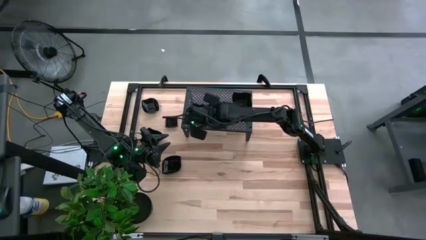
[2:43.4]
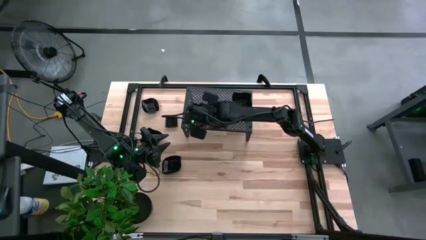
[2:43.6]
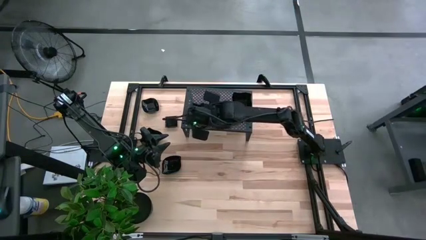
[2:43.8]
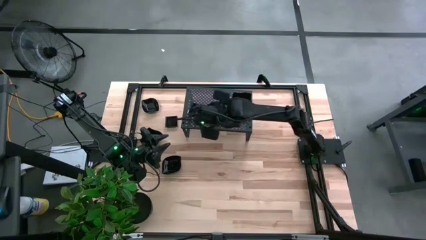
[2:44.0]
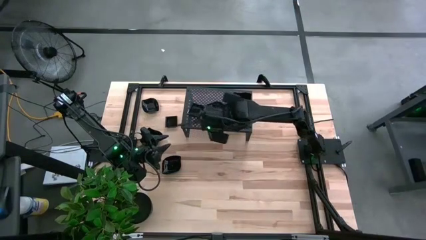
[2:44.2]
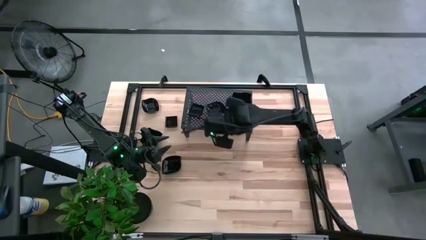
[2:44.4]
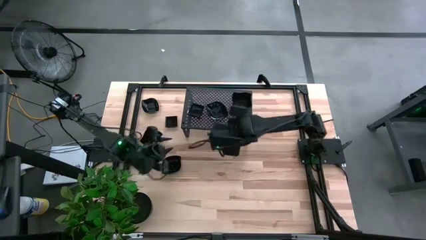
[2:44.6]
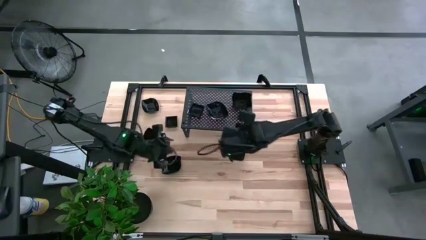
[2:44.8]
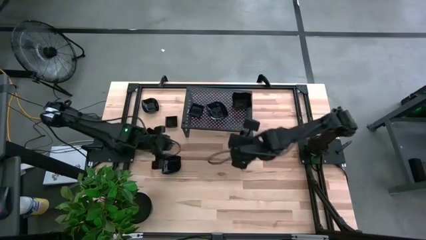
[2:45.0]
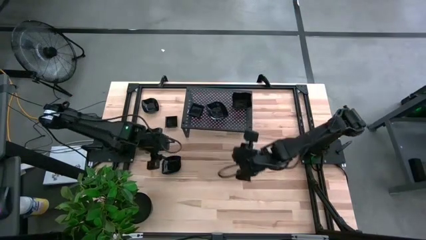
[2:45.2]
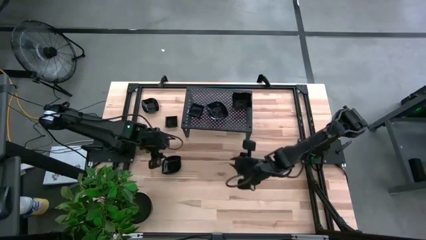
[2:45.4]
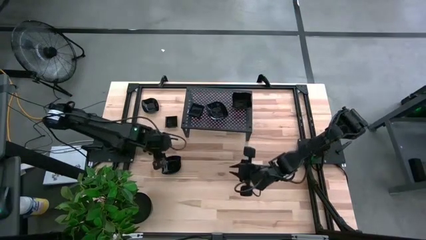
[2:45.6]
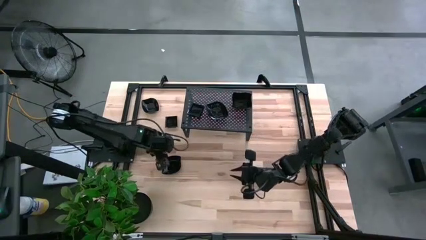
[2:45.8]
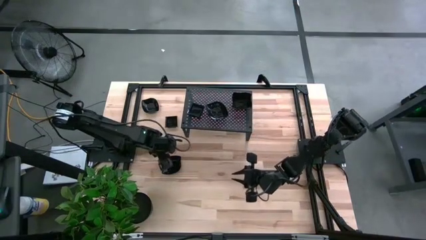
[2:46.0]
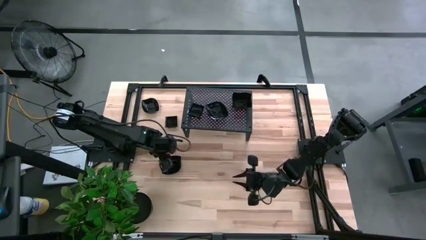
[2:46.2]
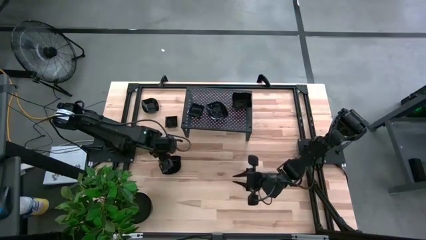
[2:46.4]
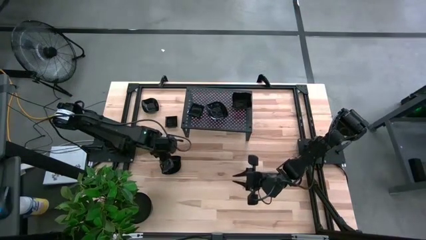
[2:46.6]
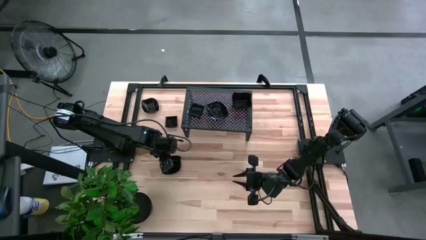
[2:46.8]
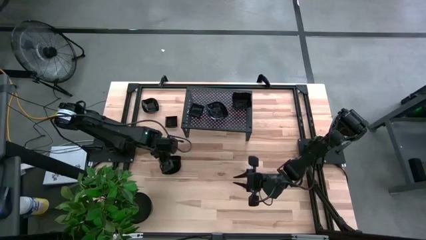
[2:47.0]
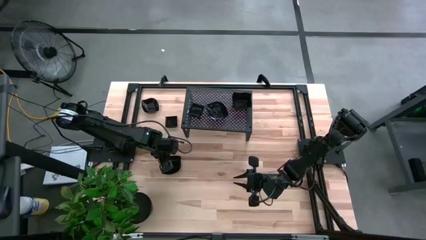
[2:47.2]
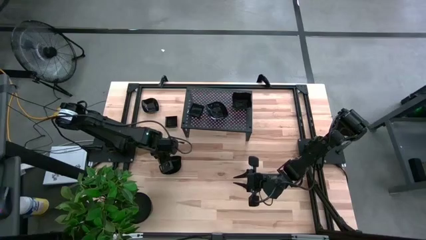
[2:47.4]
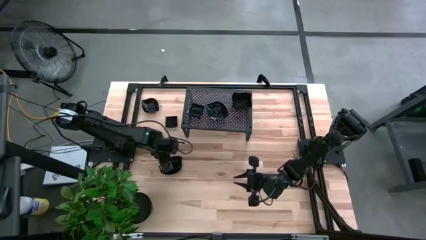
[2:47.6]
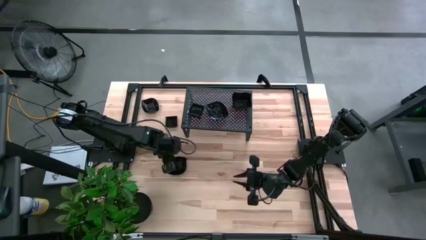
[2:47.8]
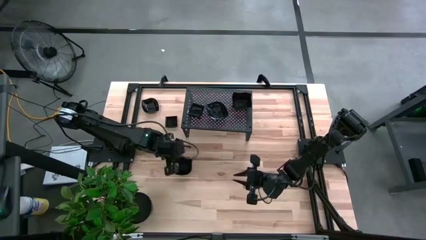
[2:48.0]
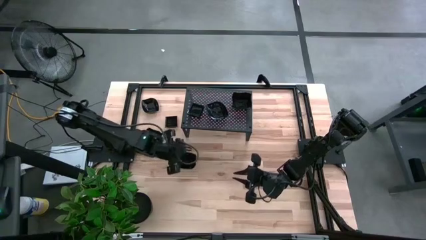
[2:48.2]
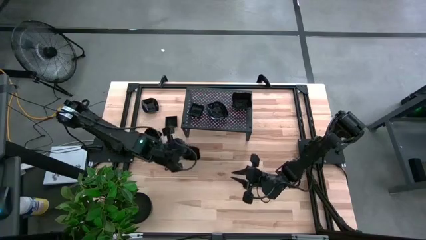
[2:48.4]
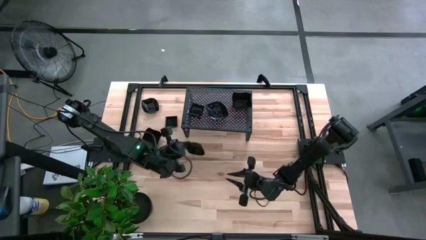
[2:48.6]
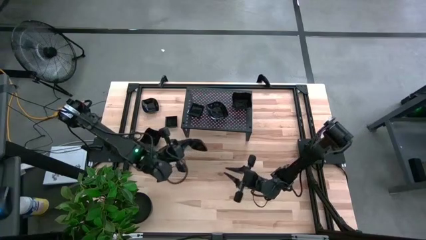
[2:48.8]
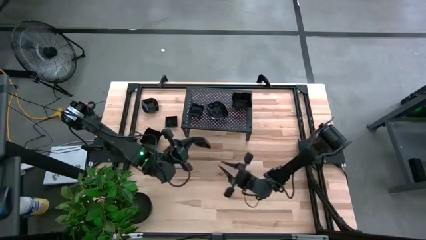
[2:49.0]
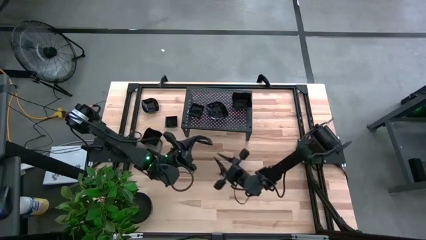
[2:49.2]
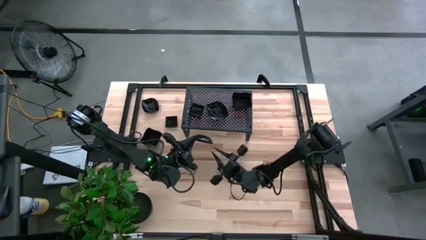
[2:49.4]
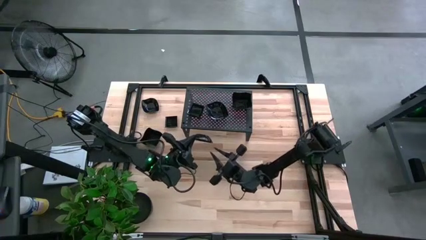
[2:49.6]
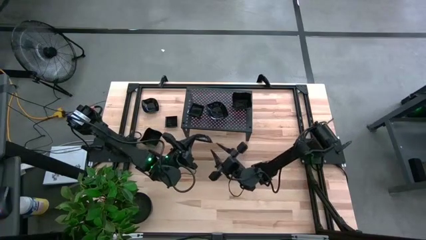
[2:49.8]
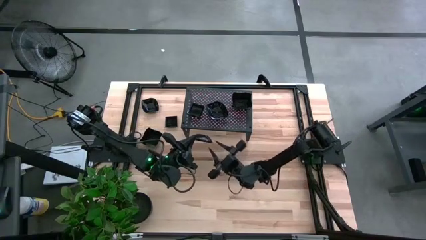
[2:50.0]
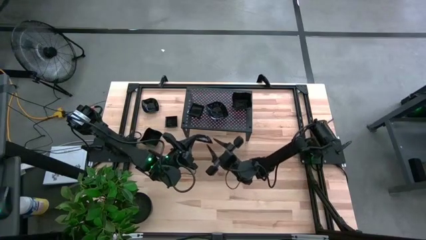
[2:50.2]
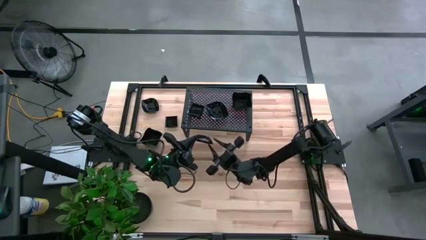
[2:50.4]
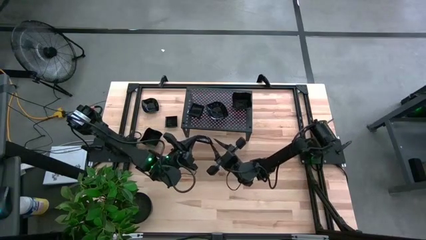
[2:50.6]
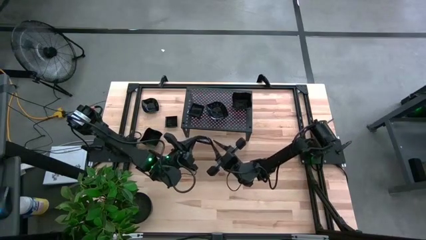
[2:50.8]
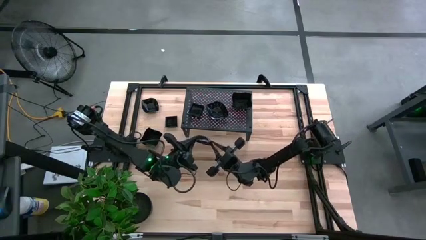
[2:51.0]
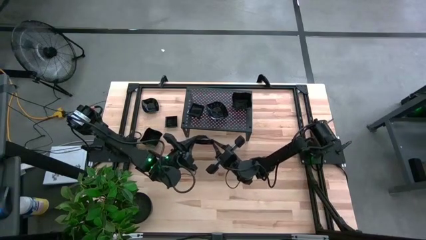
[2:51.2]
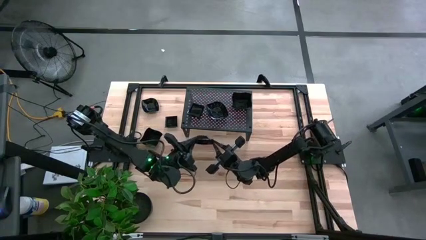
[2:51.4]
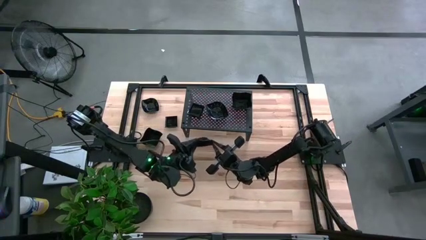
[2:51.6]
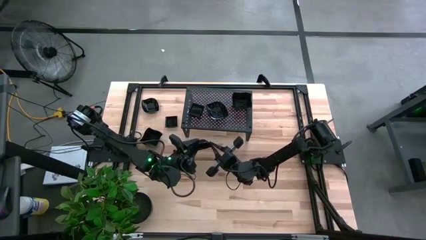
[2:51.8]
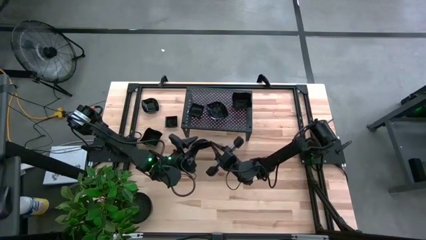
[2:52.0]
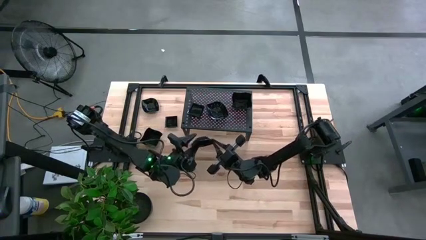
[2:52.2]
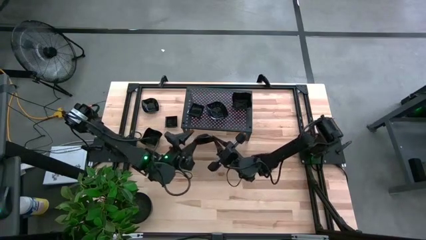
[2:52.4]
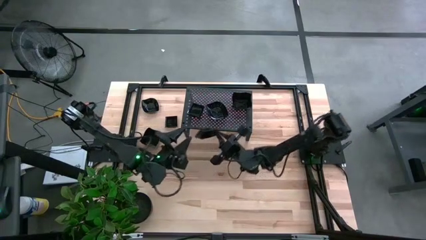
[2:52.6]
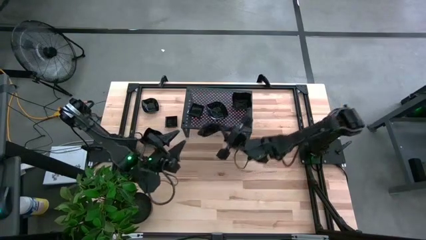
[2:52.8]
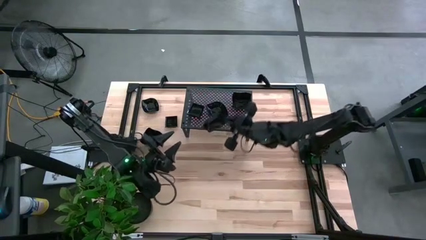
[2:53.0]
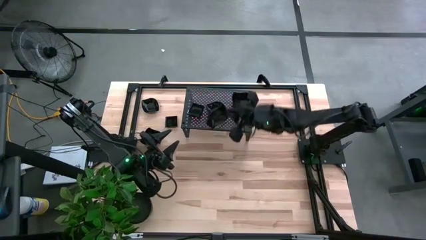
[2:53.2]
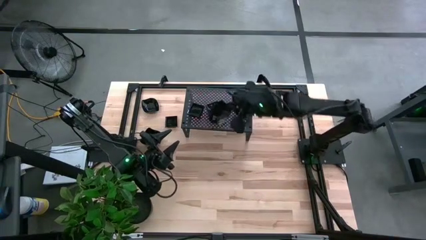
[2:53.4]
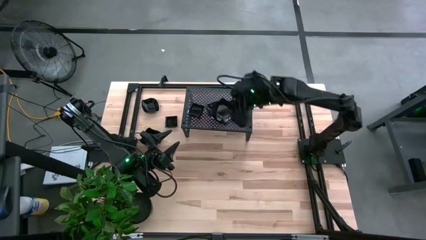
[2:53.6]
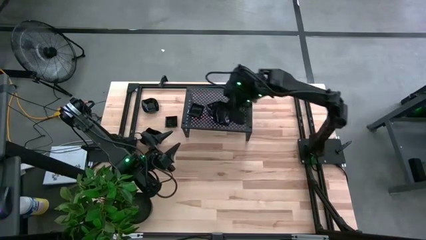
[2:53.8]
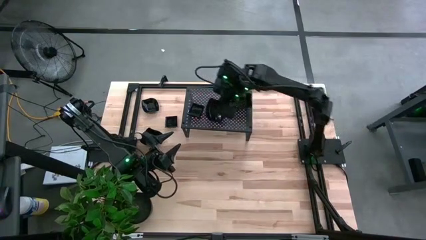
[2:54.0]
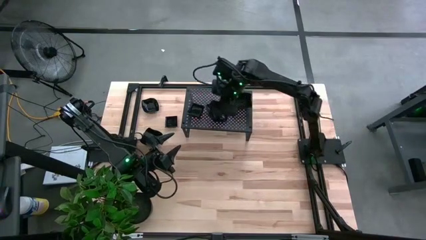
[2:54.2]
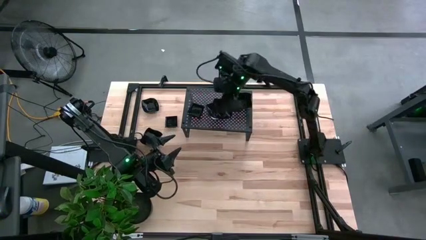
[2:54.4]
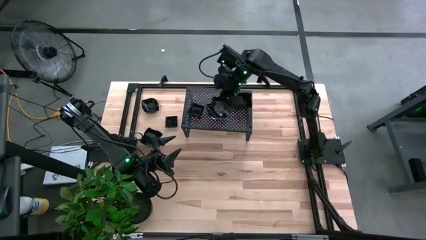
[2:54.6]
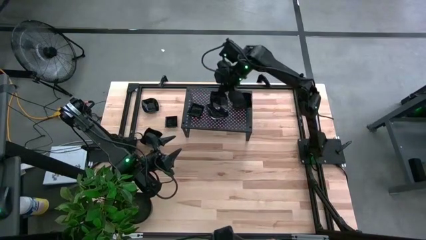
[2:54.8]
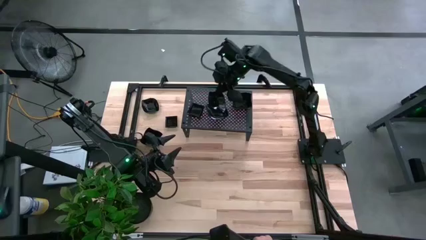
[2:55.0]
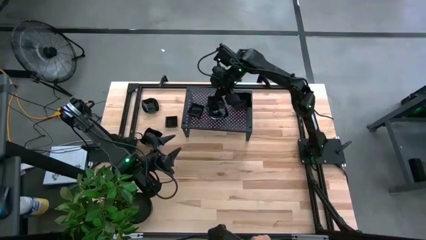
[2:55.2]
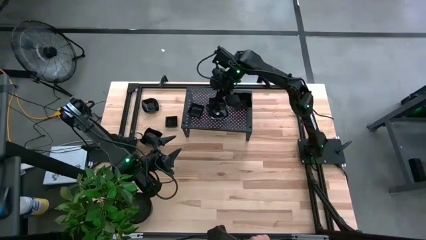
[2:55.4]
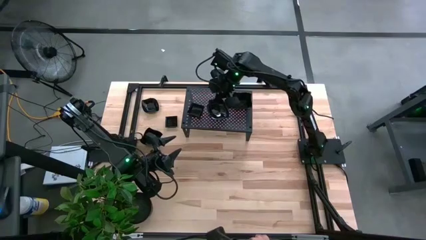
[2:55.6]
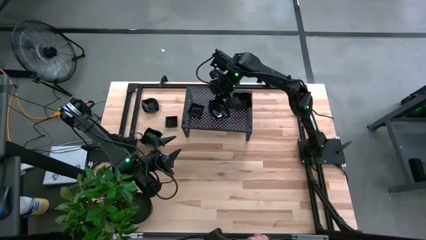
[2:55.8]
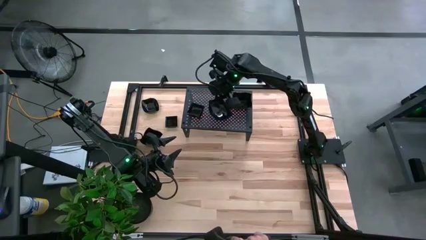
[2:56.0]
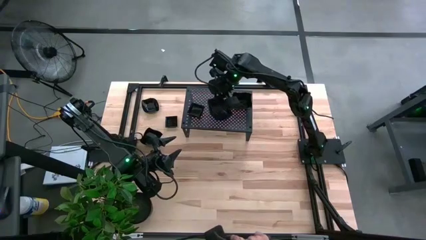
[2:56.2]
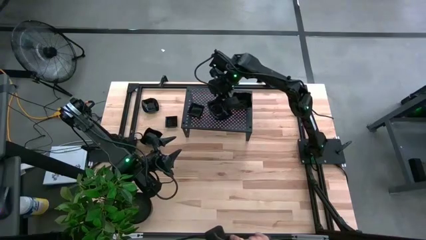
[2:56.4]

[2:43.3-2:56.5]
Task: Pick & Place Mini shaped plates
Stack the leaf-shaped plate on the leaf-shaped plates on the shelf
